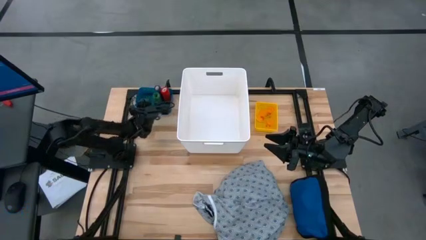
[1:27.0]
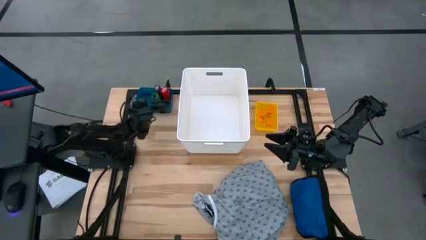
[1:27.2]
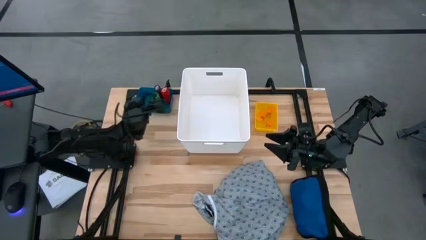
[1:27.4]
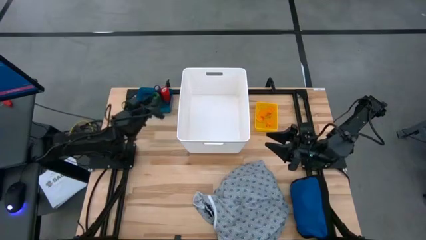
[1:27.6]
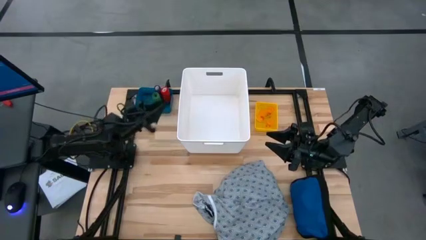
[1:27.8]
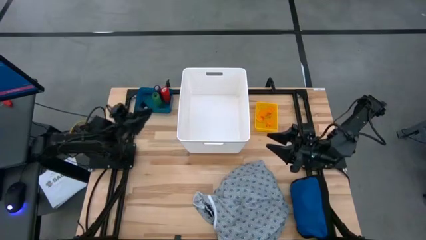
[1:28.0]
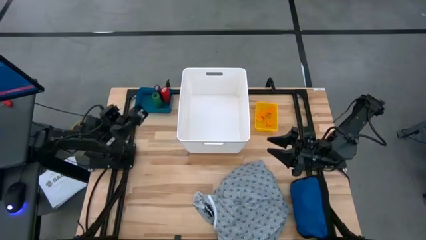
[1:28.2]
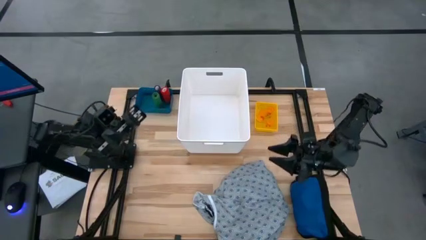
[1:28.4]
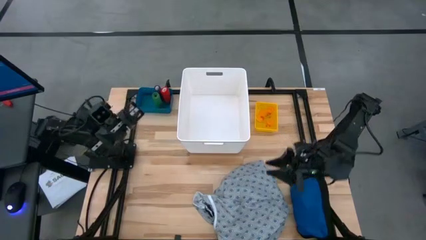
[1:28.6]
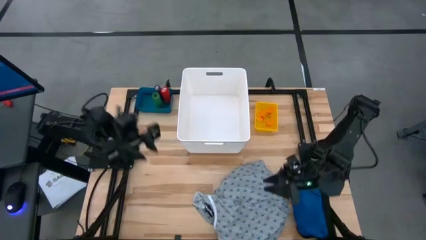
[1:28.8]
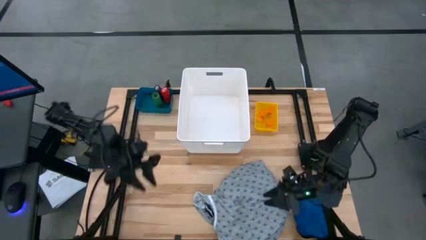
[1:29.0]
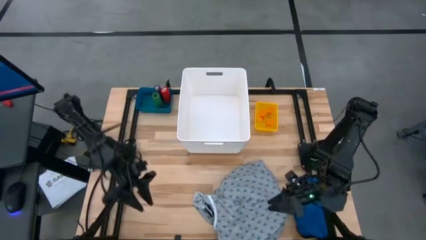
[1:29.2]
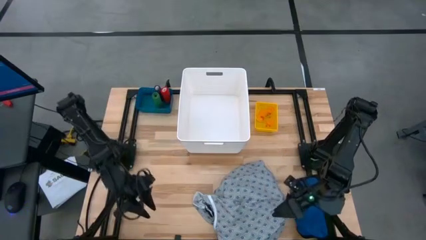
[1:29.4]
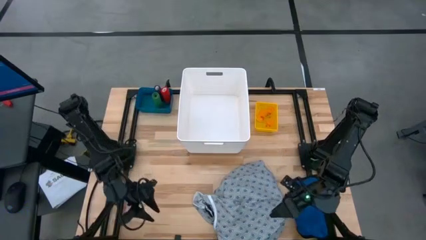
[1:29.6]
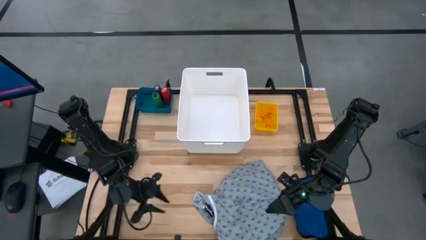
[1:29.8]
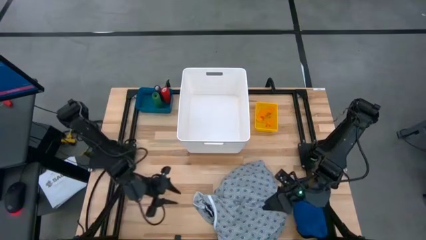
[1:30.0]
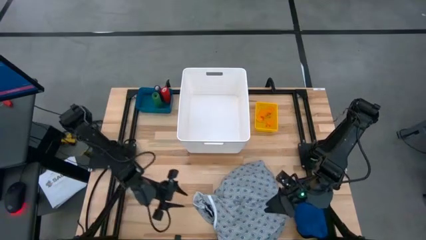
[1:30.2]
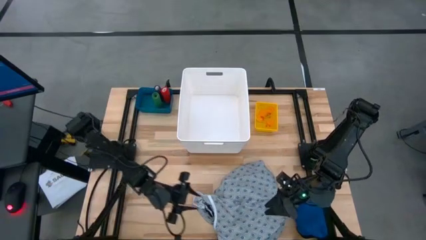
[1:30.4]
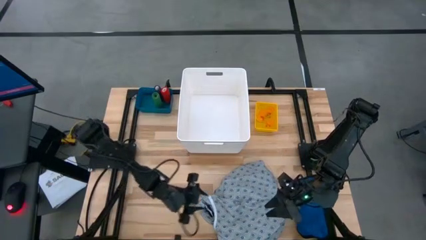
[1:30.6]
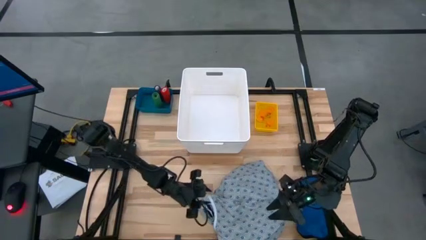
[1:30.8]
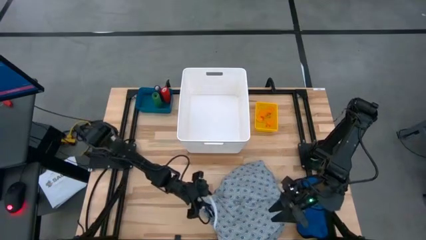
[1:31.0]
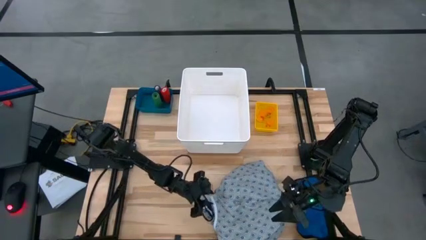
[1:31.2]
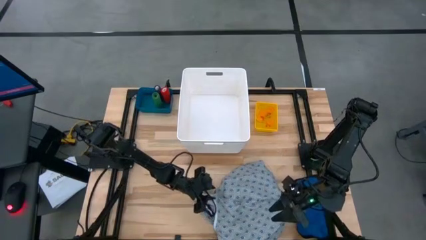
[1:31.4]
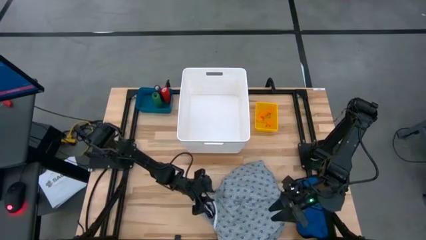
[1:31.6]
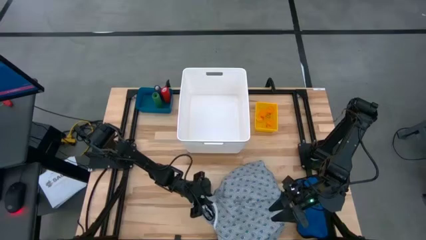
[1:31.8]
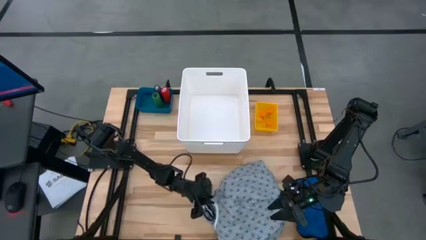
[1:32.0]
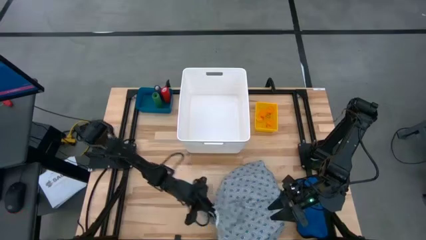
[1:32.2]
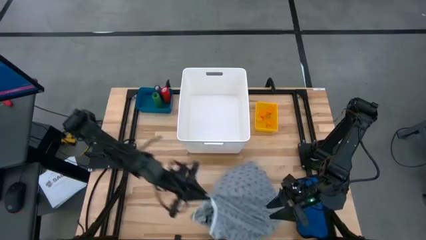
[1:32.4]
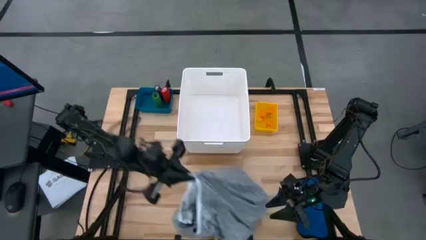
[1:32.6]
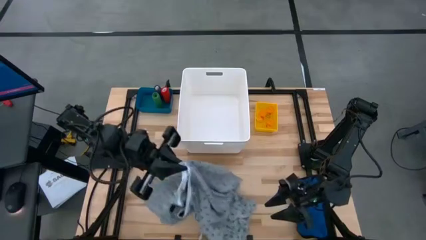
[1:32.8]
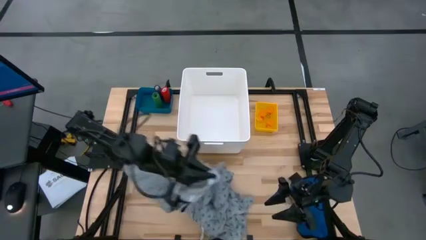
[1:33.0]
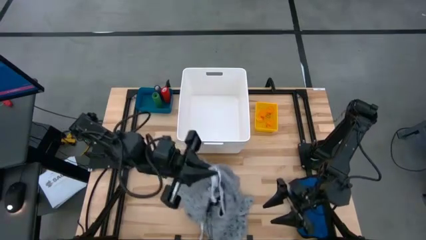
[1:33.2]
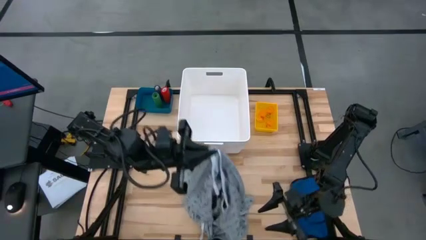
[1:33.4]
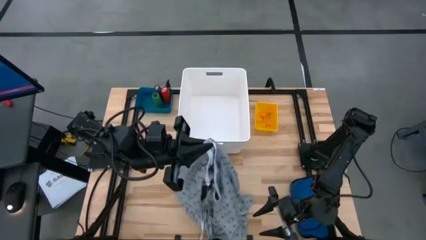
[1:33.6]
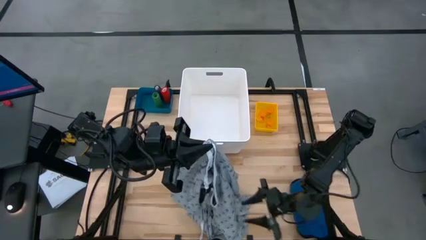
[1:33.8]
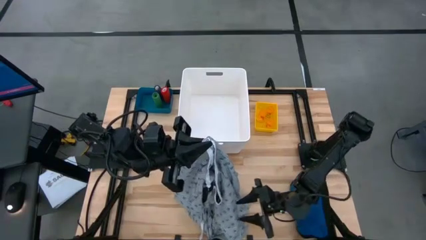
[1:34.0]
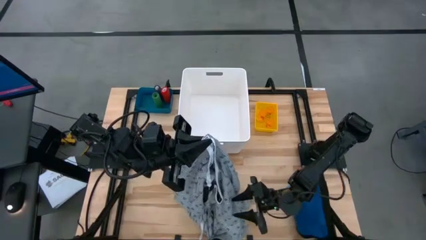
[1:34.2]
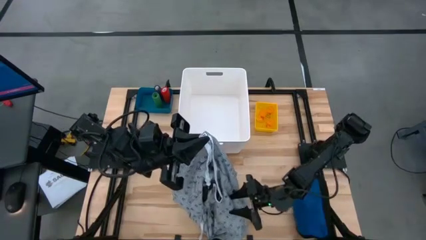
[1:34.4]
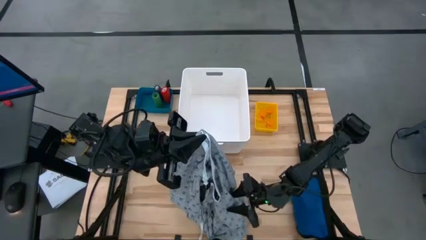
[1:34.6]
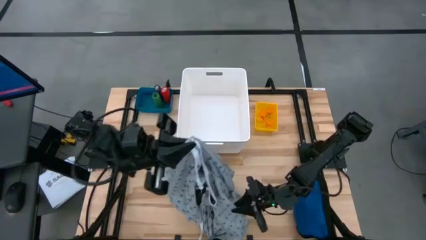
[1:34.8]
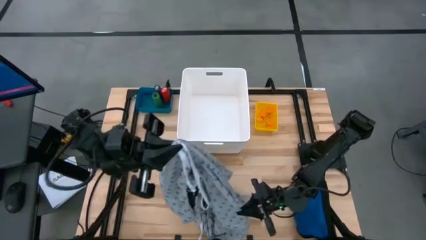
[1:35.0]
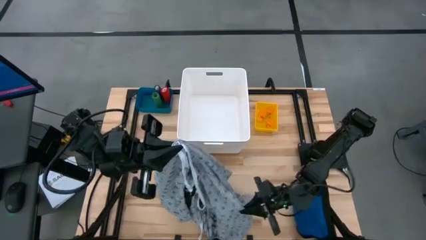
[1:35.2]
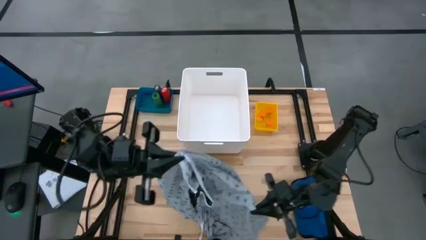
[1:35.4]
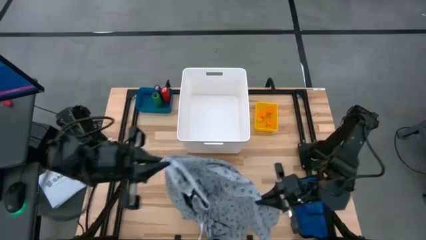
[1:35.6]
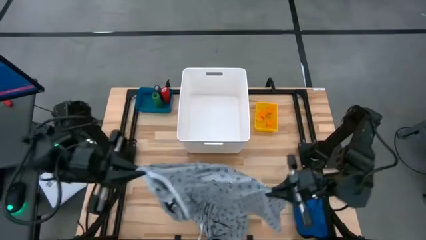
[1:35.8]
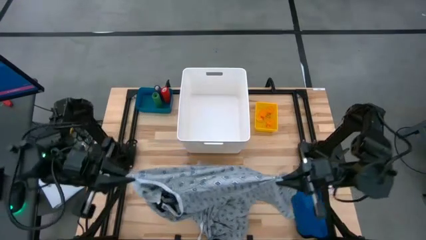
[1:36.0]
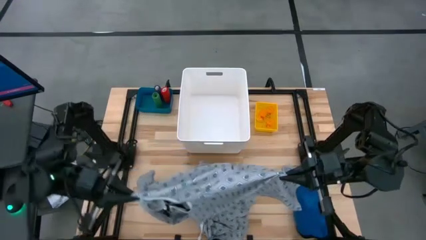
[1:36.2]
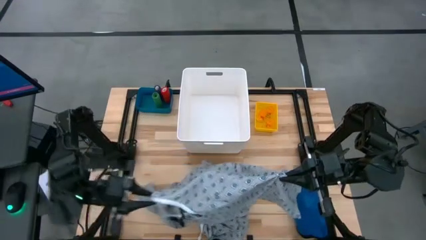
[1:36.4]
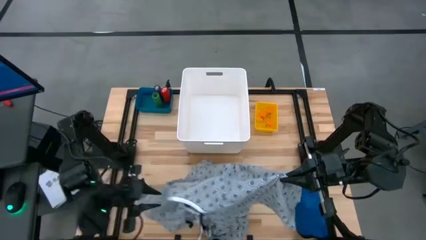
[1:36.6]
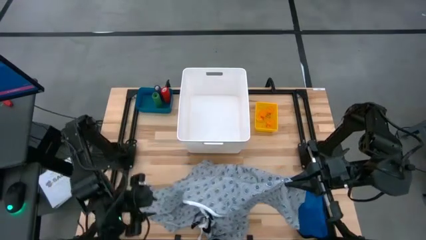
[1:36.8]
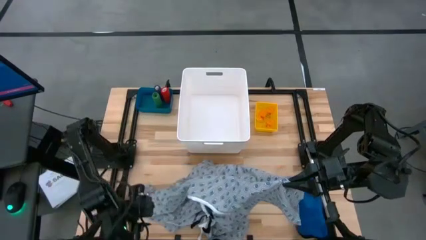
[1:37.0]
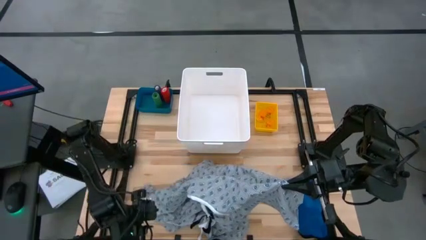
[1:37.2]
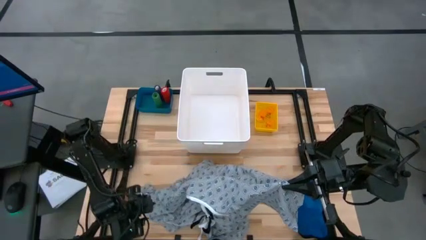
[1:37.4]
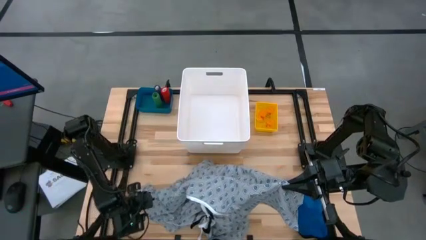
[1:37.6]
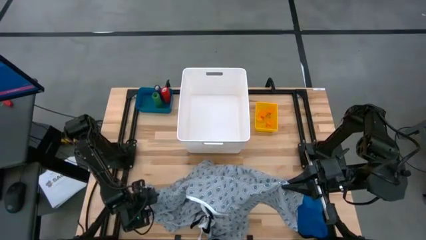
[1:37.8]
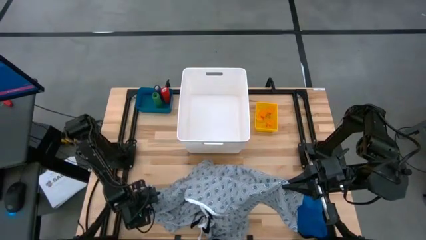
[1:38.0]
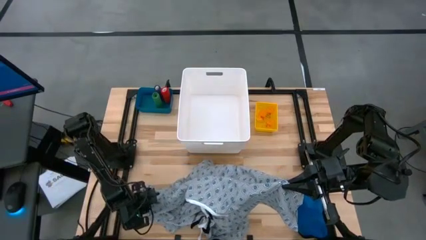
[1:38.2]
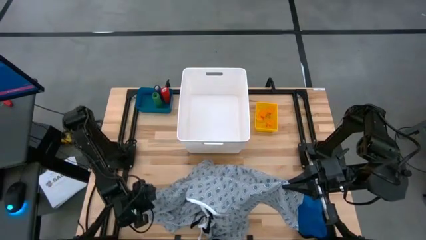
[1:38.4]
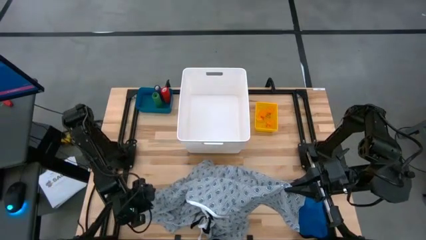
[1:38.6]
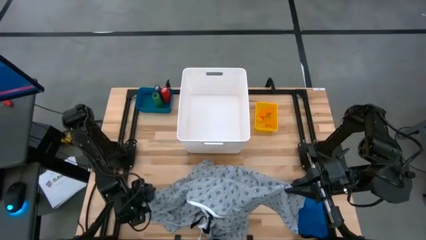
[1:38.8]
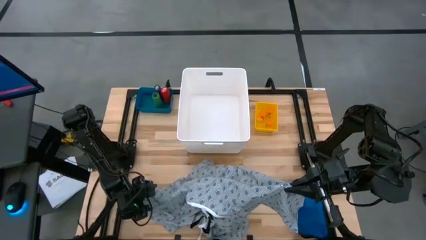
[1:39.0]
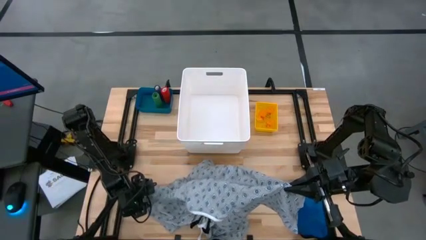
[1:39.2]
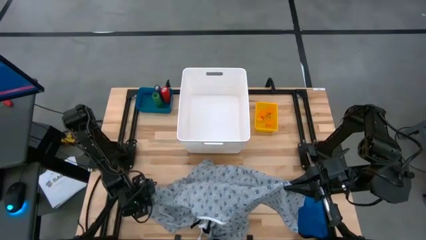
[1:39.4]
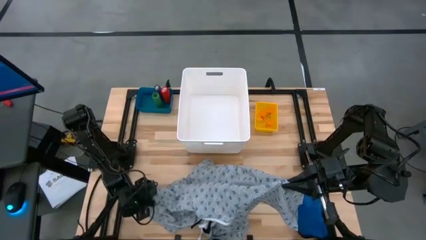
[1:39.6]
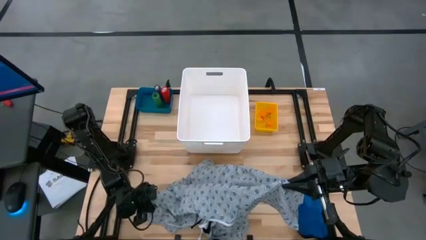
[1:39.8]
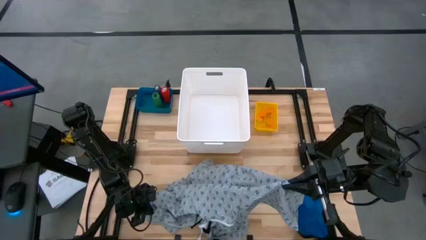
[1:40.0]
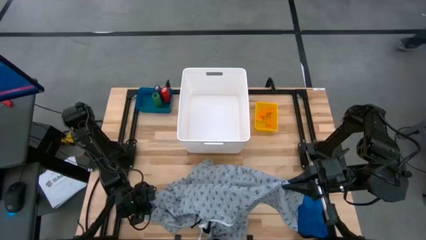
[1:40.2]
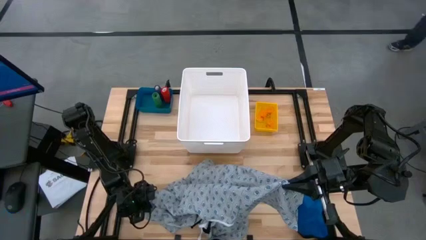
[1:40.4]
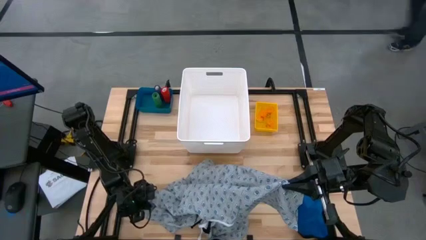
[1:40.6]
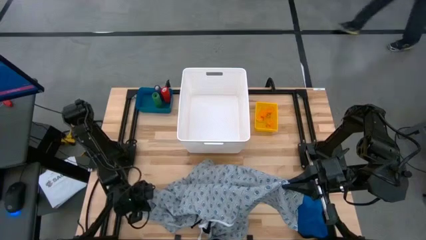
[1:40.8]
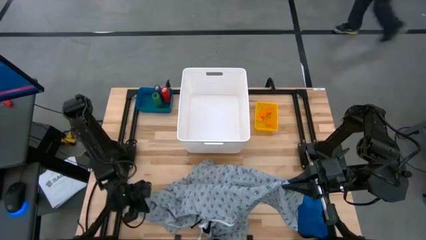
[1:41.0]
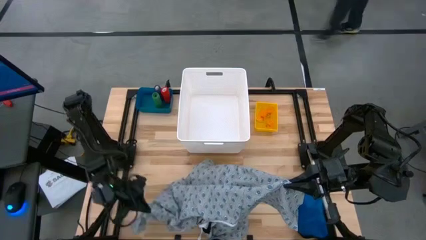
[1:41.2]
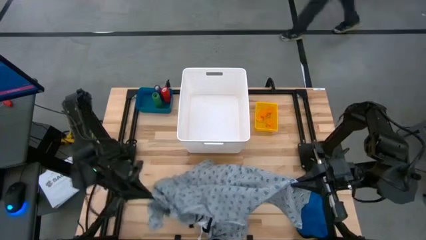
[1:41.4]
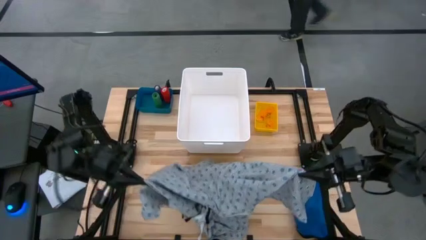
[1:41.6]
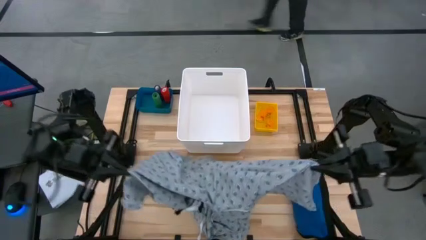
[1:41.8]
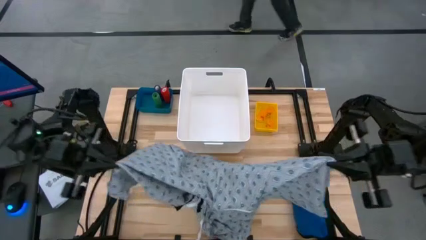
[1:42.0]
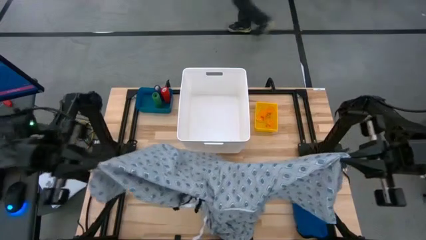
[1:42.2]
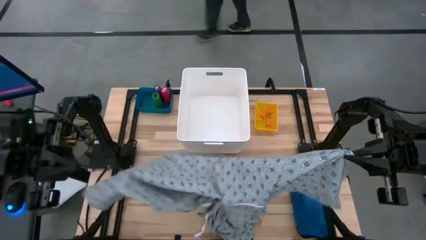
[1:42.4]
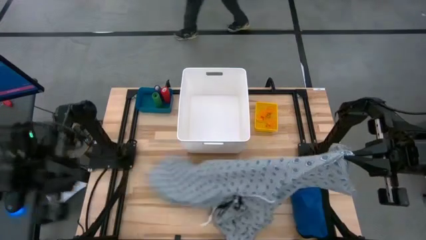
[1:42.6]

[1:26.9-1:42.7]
Task: Pick & place medical supplies in basket/bin
Put the gray patient gown into the white bin
